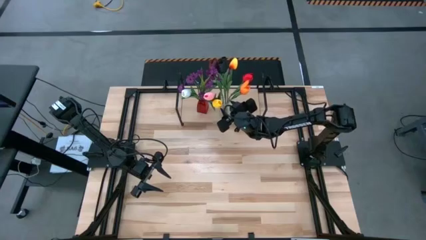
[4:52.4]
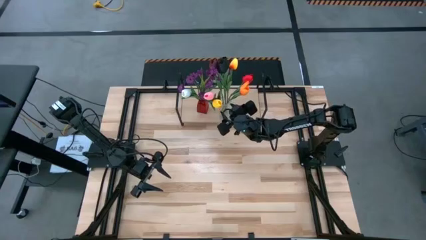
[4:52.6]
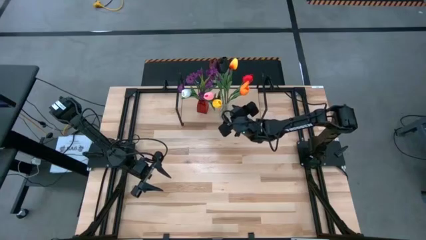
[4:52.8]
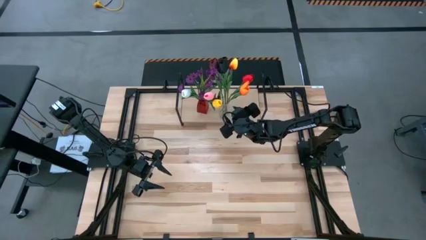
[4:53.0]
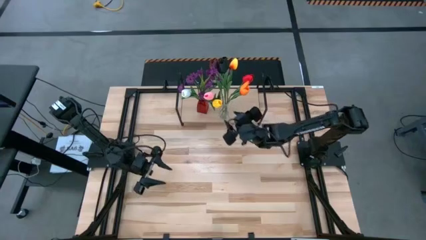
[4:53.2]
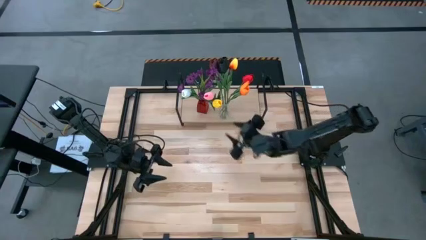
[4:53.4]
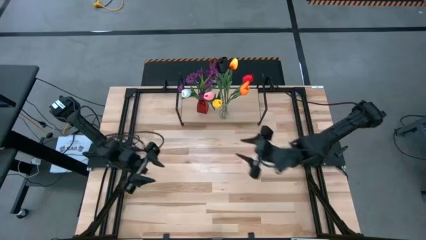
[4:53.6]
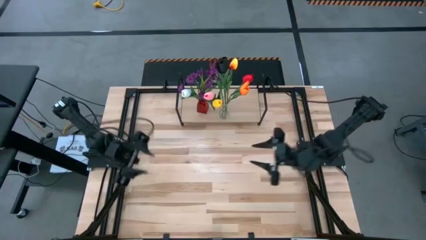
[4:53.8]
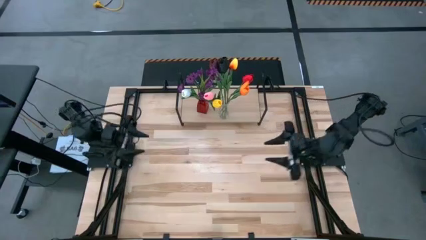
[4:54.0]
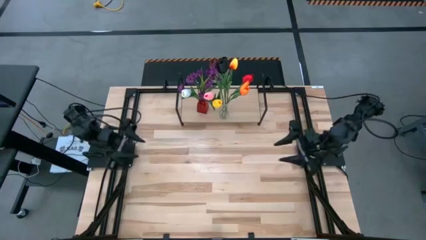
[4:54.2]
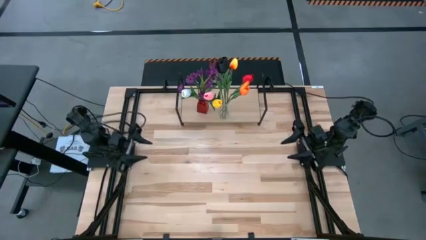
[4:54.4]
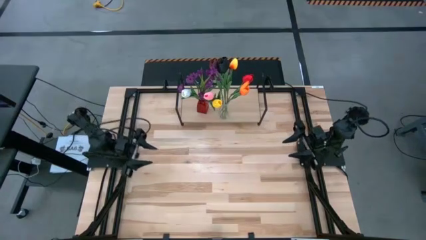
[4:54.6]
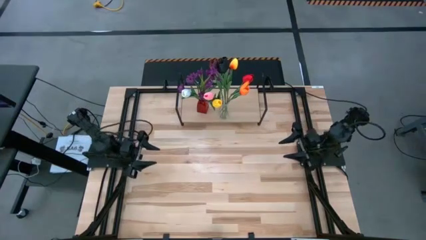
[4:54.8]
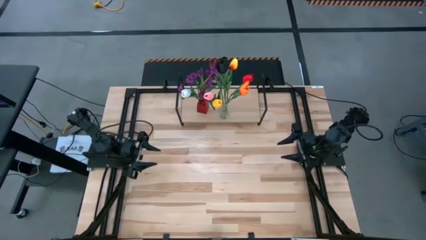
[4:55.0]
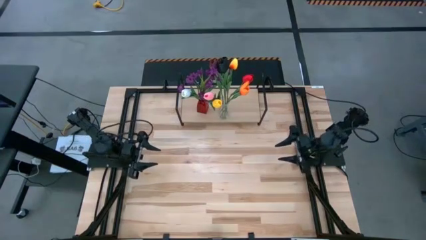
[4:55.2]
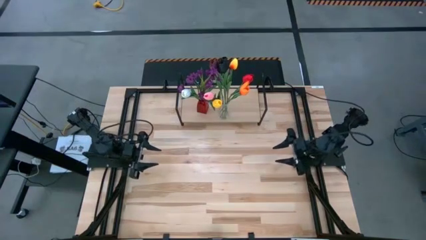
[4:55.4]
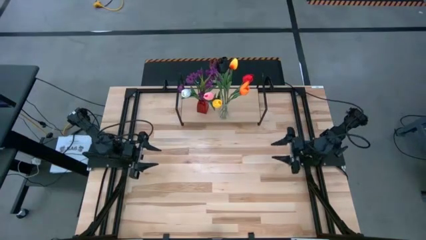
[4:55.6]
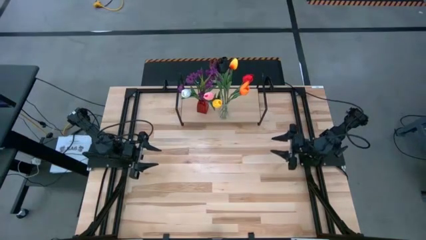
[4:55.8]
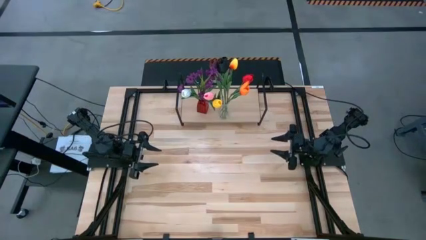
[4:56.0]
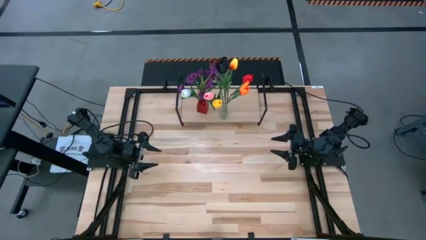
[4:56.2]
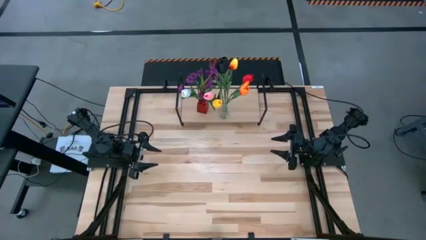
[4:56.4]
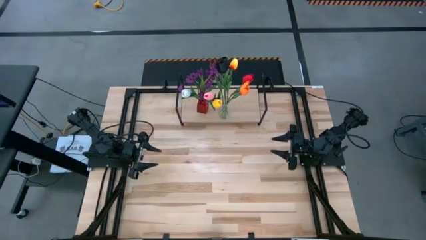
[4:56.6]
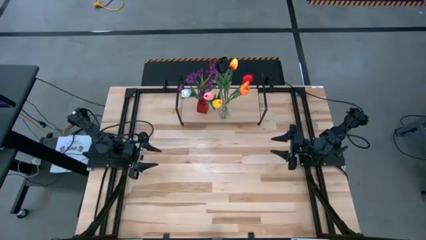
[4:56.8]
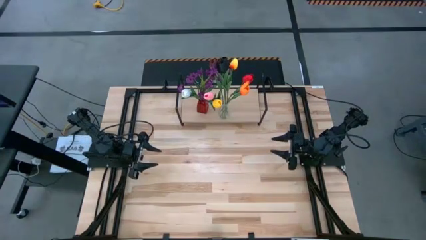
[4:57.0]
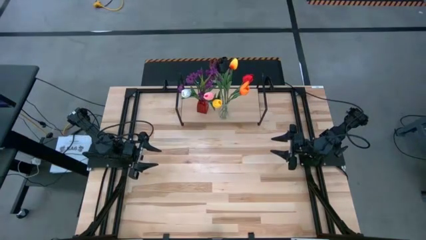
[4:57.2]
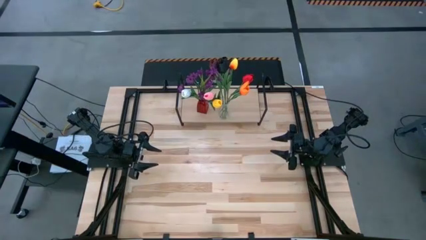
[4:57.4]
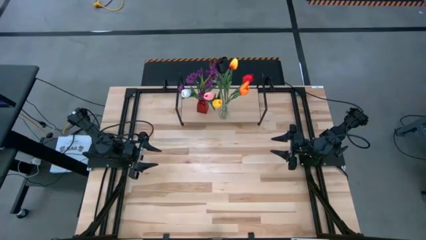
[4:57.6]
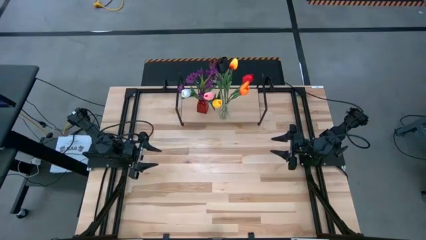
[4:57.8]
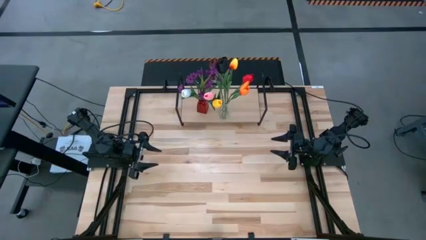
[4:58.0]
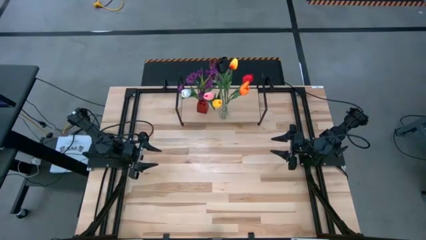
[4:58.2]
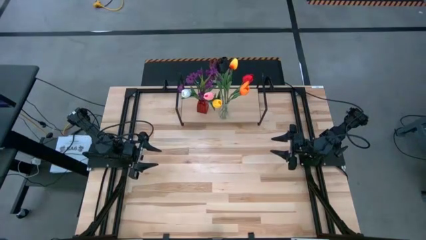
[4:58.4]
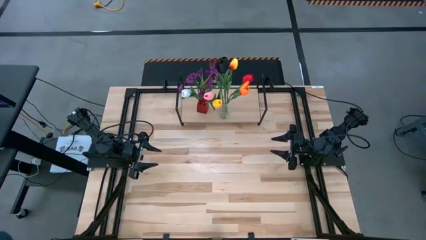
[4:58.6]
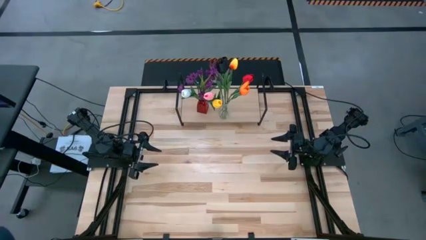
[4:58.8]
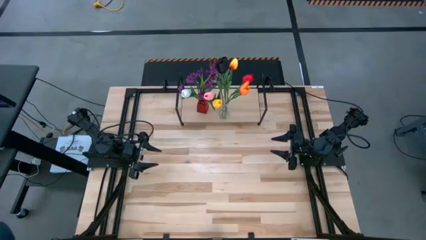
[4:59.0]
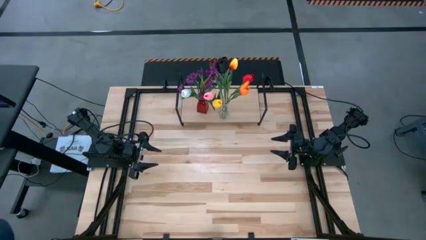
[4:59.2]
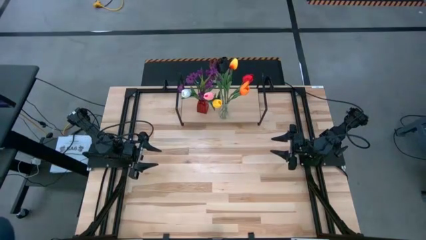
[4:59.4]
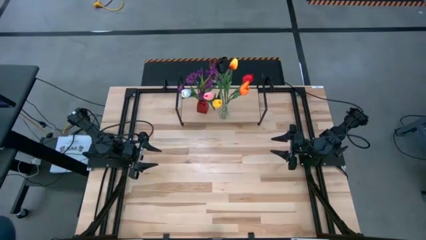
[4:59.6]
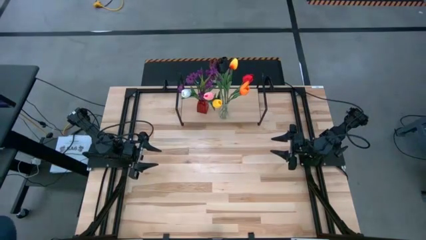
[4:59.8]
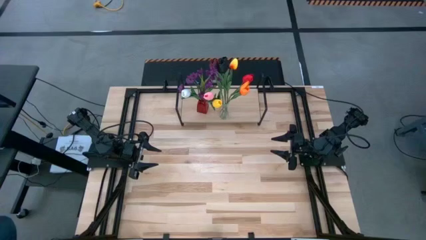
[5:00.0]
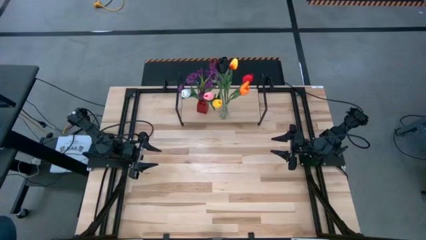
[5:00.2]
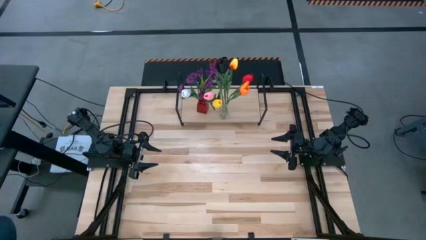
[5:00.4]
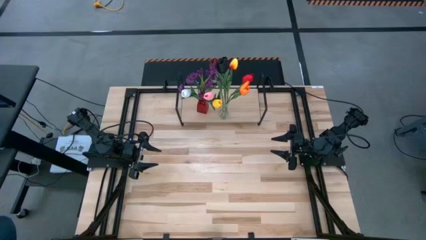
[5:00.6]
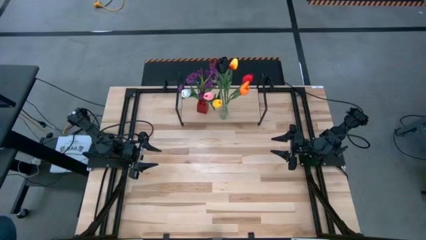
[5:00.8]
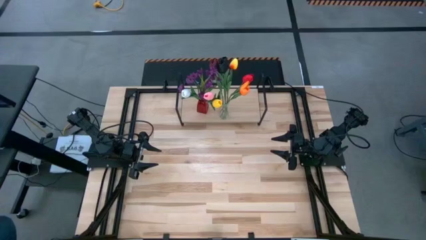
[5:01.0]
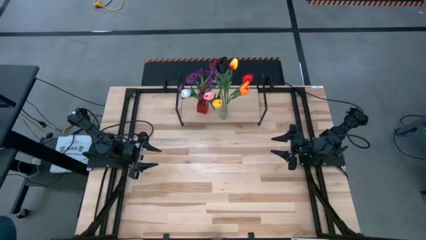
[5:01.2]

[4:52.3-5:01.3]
Task: Pick and place flowers into a vace then onto a shelf
Return to Home Position

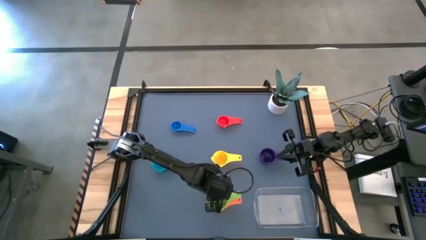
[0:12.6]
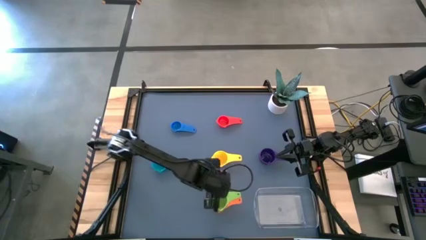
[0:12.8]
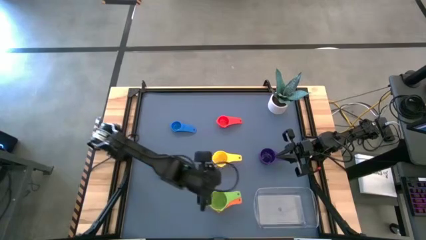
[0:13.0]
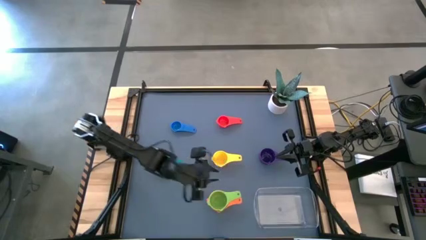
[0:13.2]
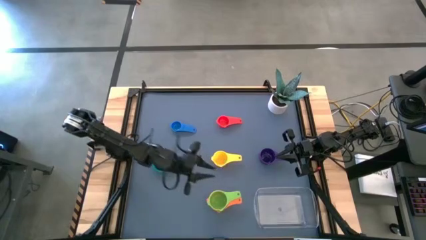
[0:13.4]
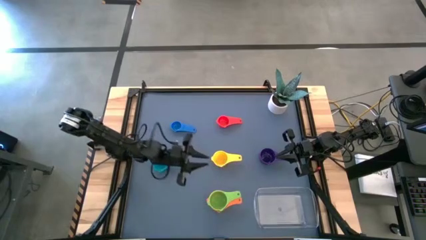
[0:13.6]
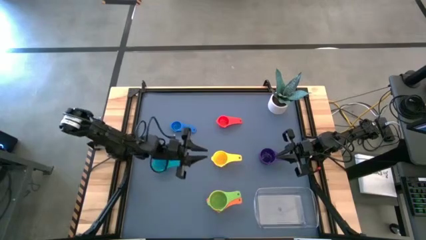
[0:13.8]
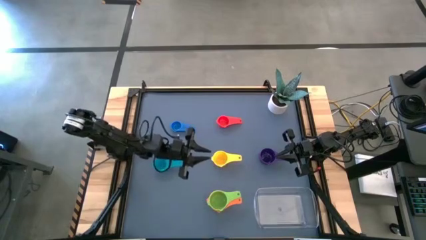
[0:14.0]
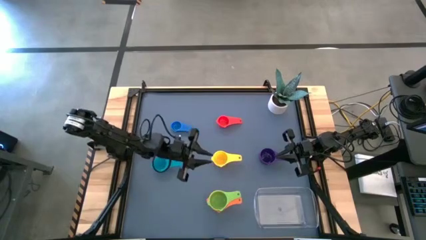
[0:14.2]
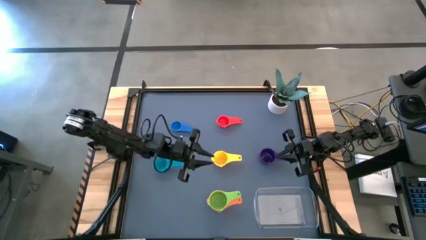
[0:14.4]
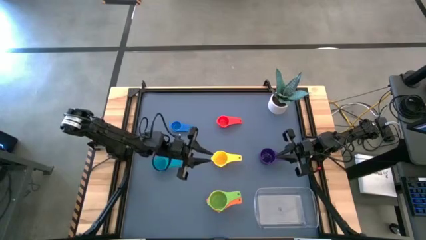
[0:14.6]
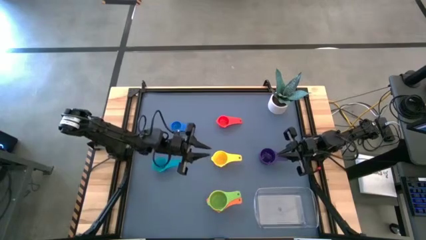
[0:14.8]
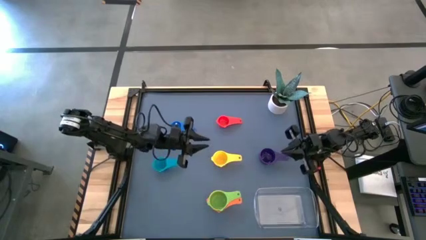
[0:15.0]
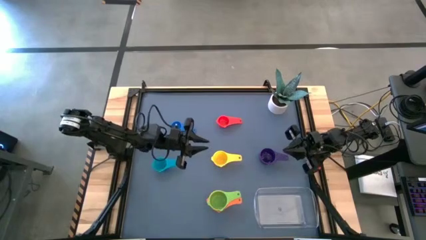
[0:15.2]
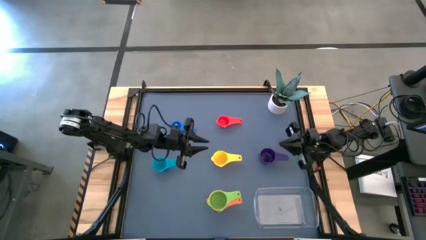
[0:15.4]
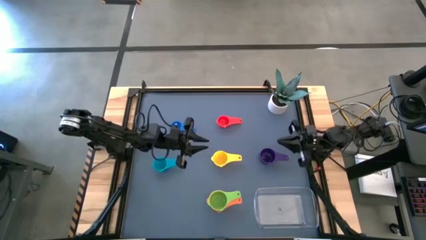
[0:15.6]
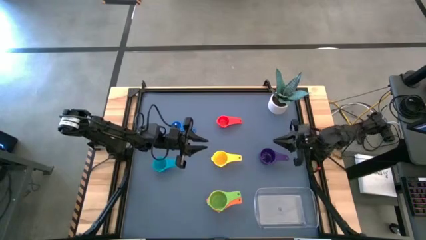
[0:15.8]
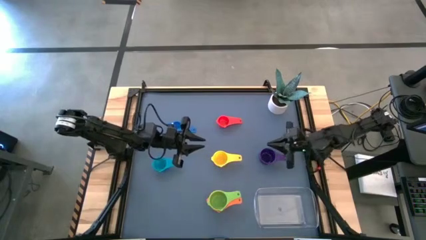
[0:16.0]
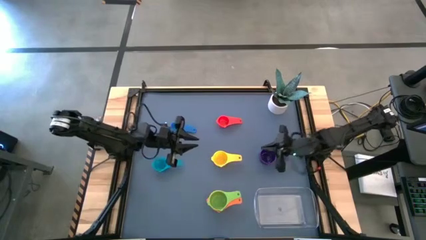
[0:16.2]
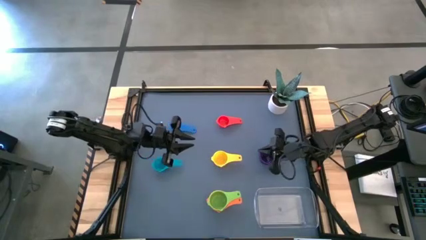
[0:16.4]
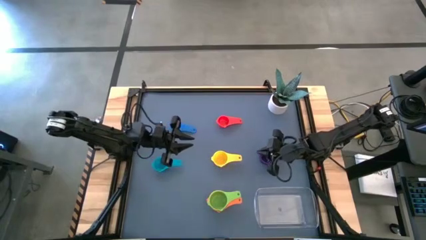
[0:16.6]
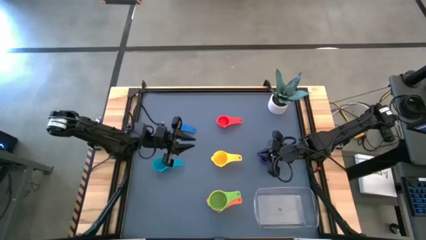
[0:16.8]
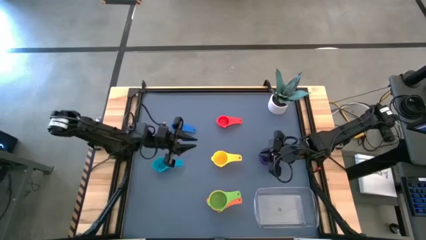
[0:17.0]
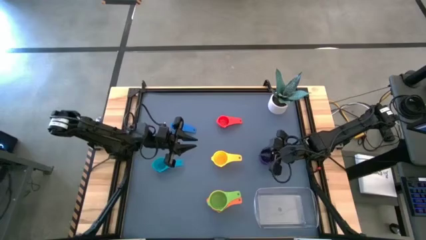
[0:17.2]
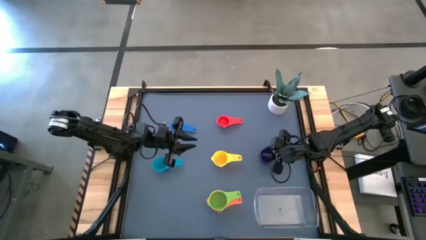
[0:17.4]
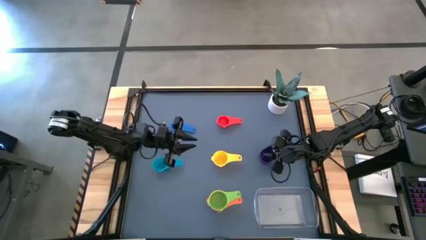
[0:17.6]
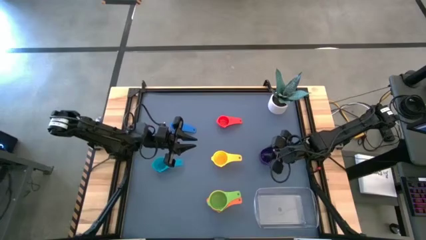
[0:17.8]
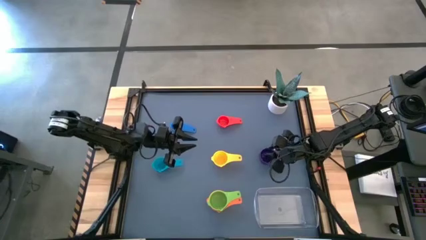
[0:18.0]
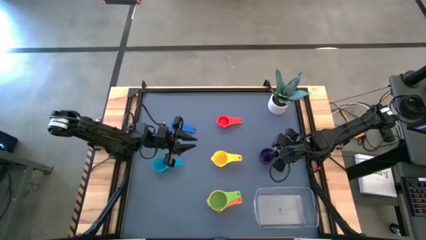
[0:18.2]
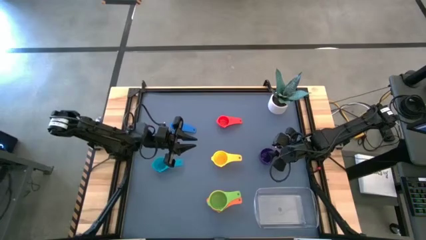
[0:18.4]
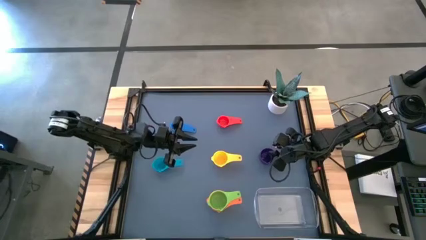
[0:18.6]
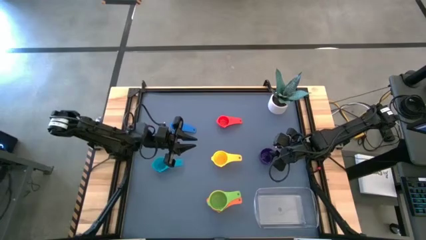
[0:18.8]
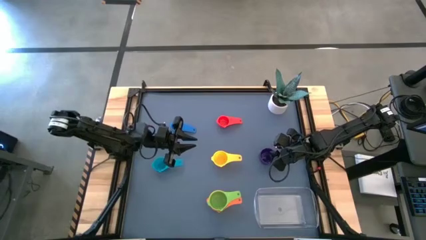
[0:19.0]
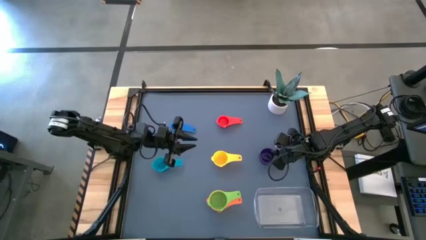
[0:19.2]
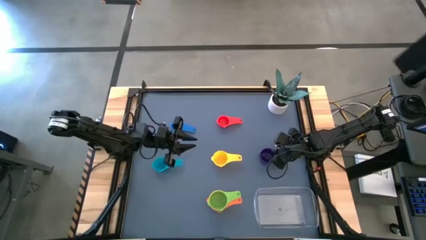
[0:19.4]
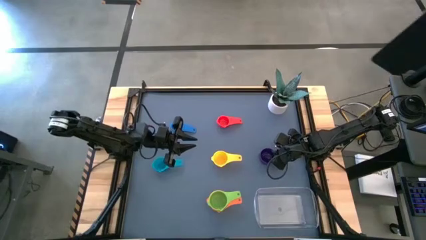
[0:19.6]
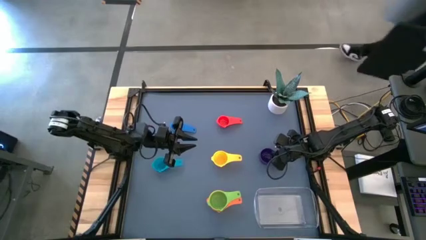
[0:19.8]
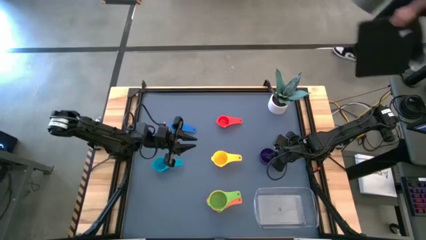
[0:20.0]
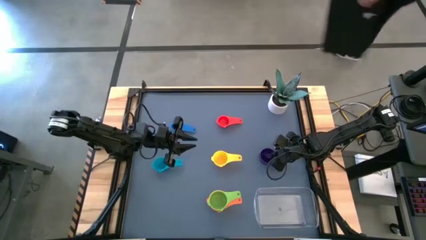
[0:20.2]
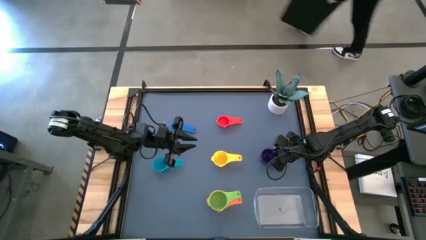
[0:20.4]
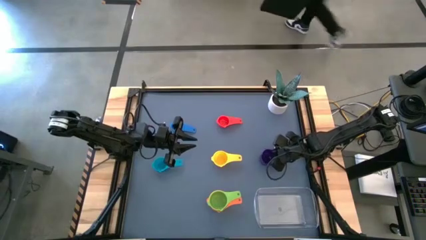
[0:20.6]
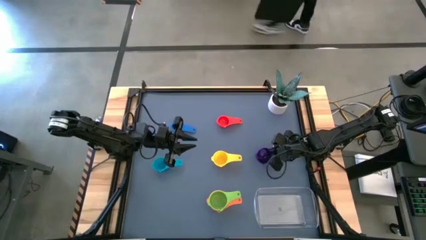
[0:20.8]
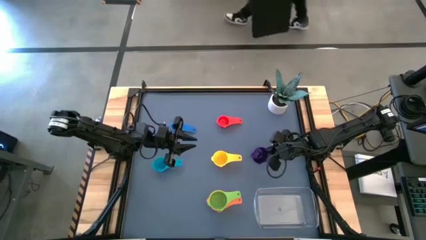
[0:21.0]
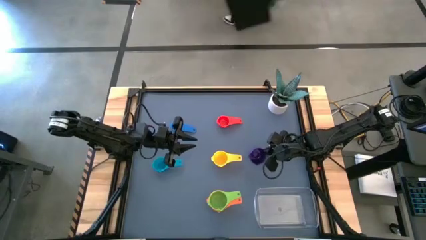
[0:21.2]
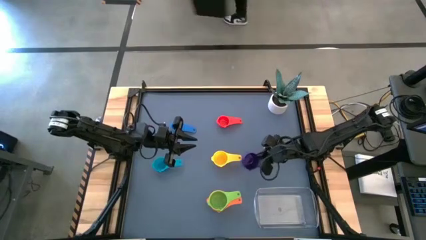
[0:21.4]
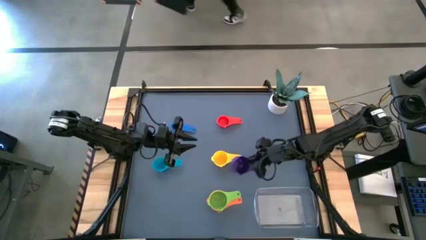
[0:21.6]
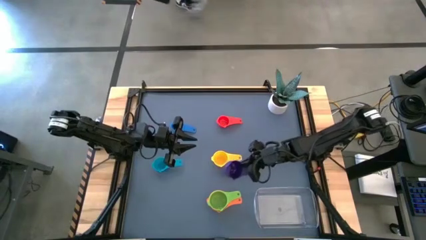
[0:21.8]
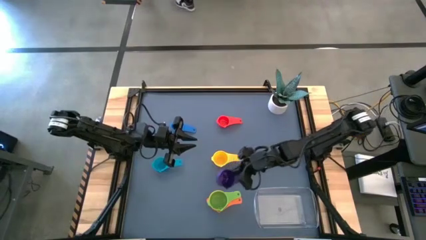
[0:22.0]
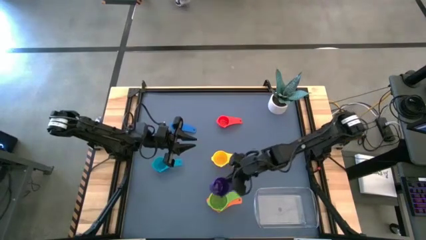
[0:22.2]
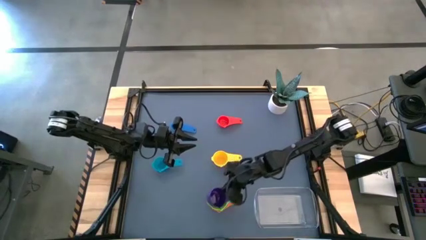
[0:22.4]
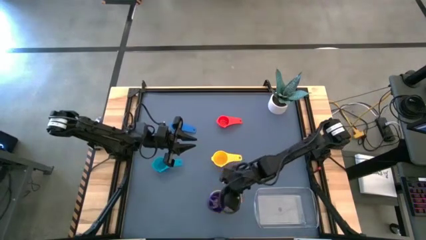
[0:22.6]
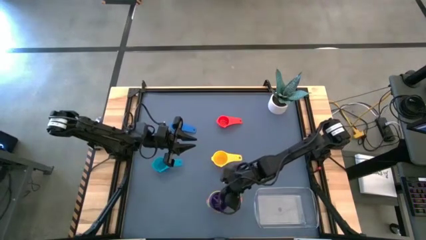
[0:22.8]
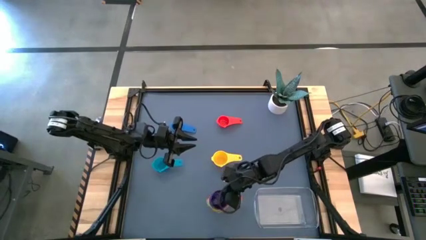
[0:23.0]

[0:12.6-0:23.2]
Task: Nest measuring cups in basket
Stack the violet measuring cup on top of the green measuring cup
